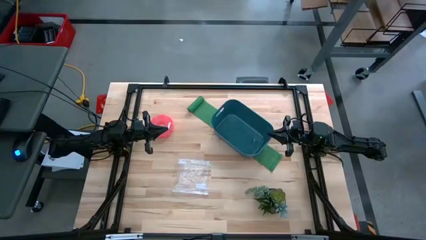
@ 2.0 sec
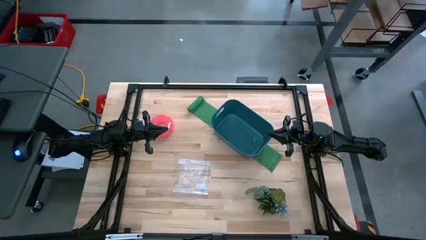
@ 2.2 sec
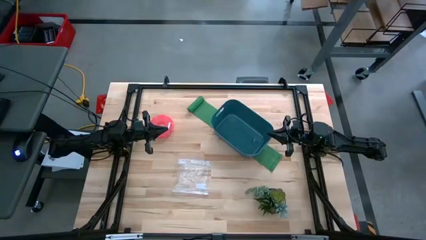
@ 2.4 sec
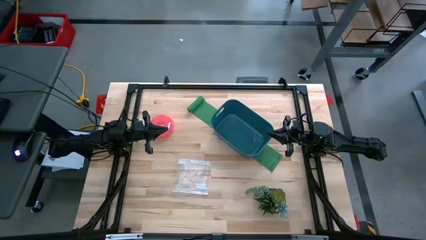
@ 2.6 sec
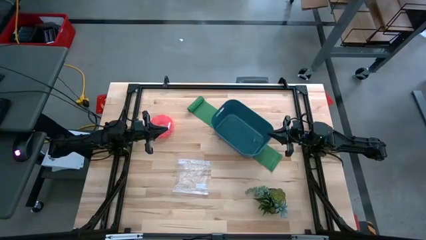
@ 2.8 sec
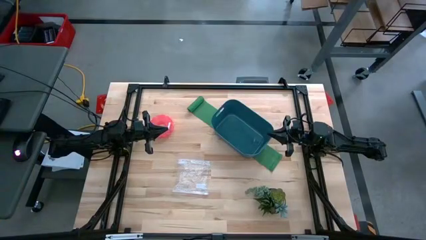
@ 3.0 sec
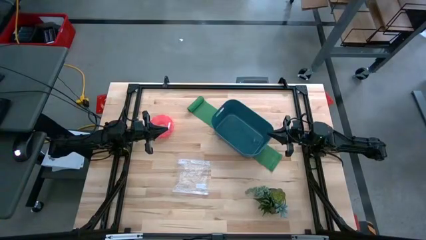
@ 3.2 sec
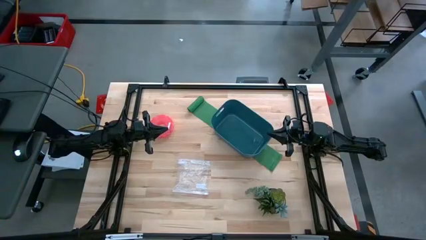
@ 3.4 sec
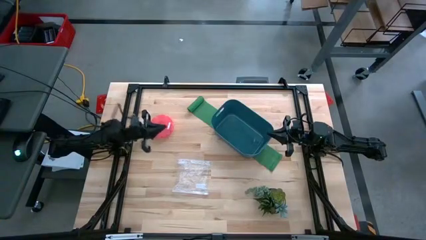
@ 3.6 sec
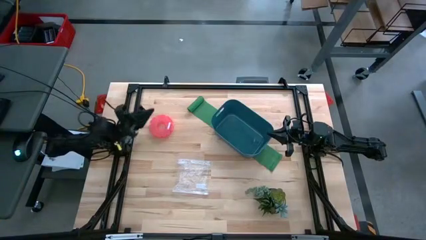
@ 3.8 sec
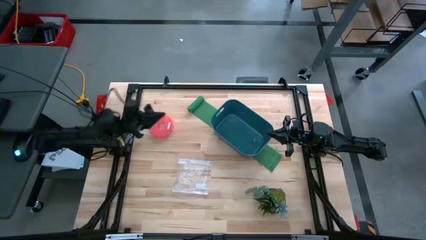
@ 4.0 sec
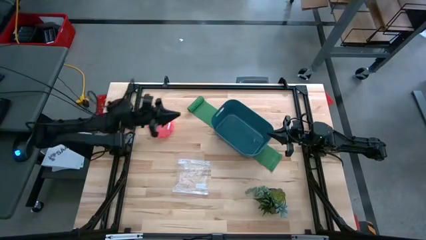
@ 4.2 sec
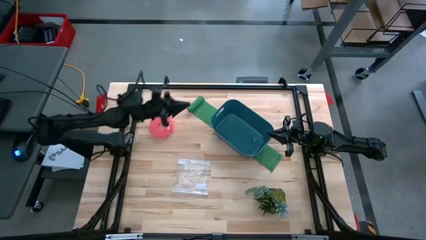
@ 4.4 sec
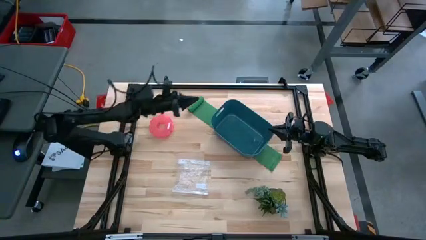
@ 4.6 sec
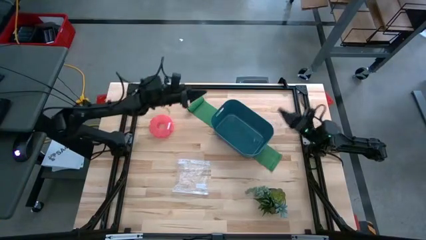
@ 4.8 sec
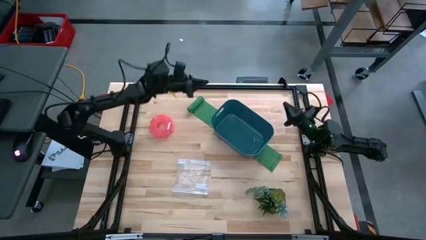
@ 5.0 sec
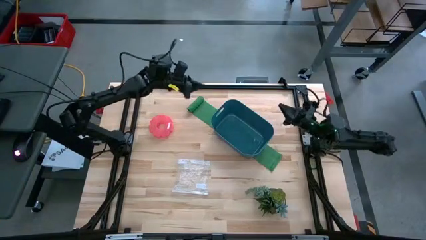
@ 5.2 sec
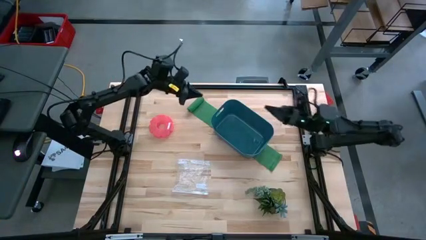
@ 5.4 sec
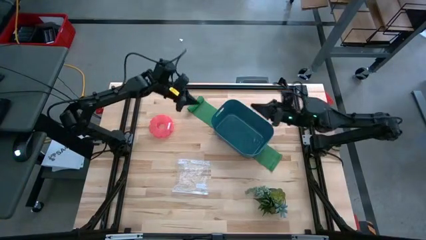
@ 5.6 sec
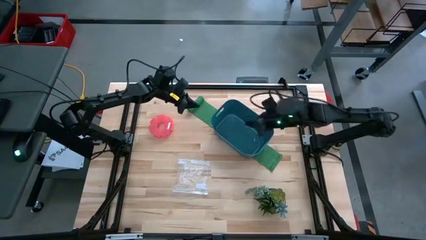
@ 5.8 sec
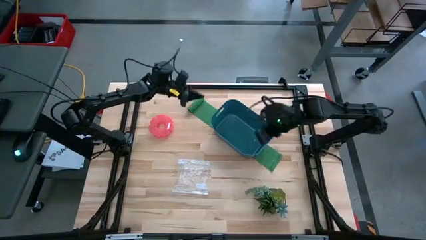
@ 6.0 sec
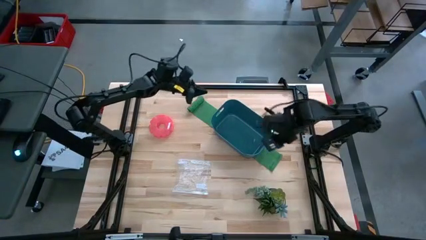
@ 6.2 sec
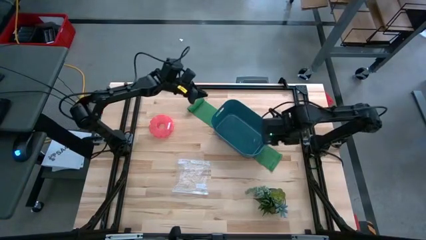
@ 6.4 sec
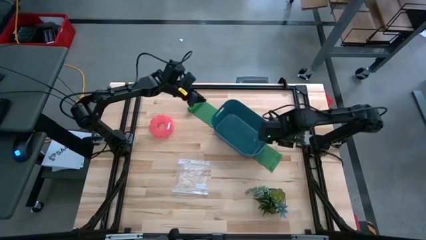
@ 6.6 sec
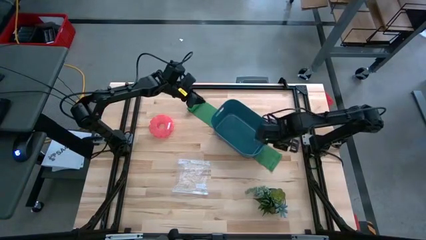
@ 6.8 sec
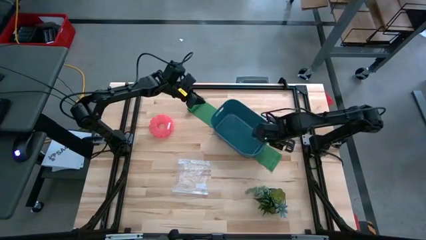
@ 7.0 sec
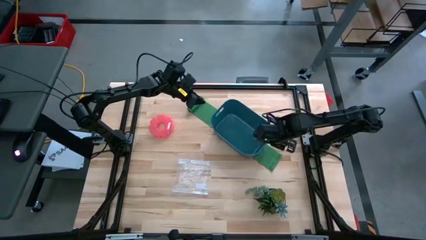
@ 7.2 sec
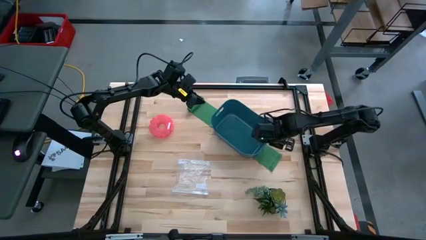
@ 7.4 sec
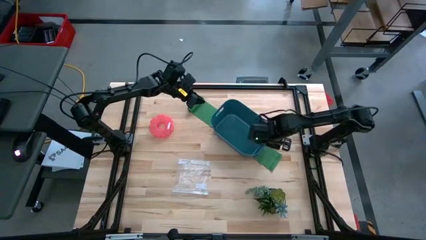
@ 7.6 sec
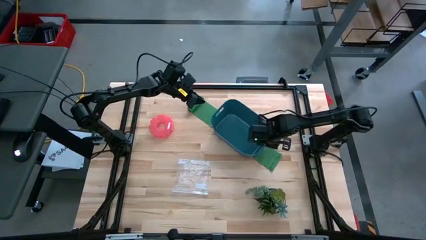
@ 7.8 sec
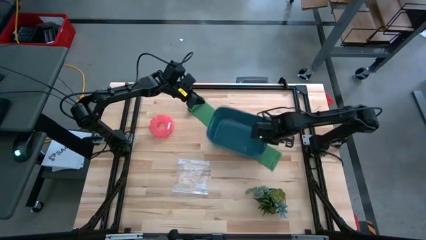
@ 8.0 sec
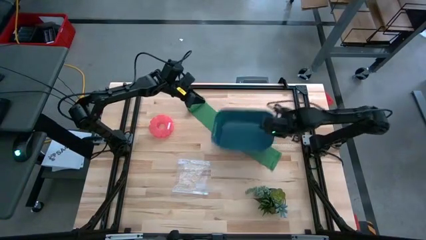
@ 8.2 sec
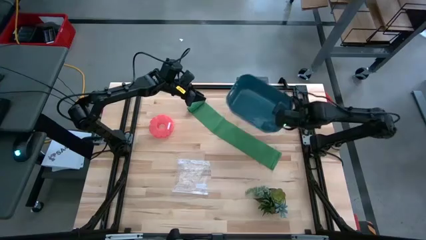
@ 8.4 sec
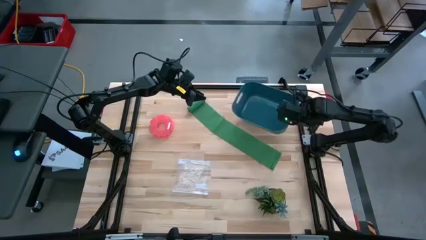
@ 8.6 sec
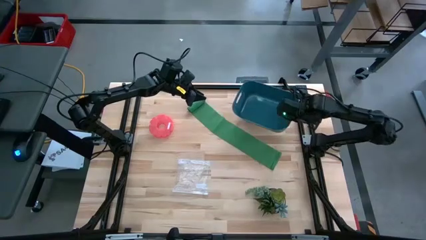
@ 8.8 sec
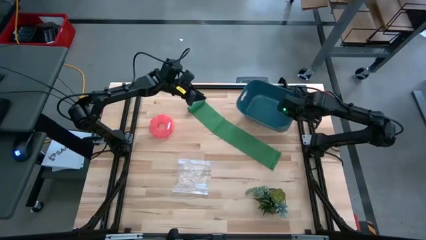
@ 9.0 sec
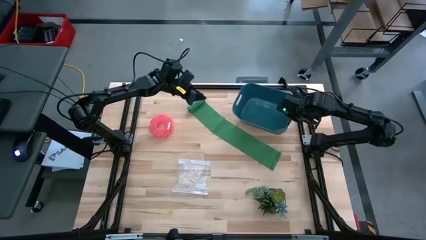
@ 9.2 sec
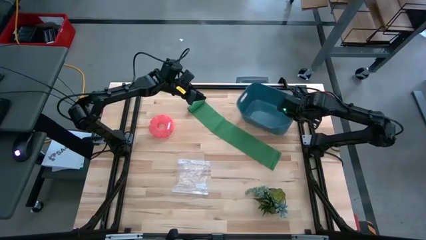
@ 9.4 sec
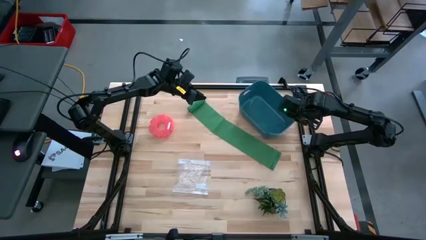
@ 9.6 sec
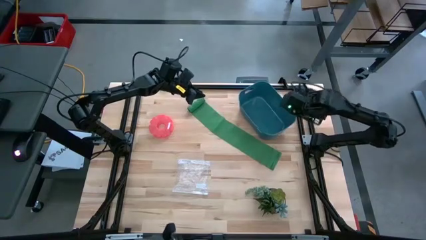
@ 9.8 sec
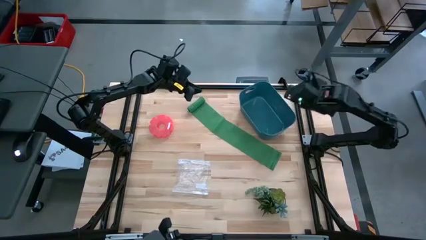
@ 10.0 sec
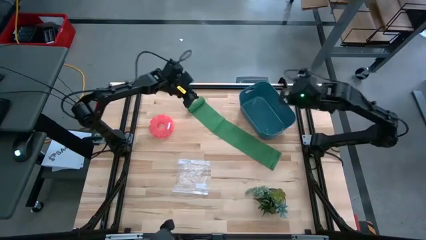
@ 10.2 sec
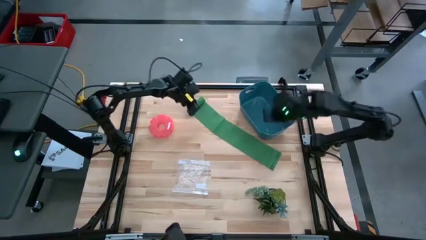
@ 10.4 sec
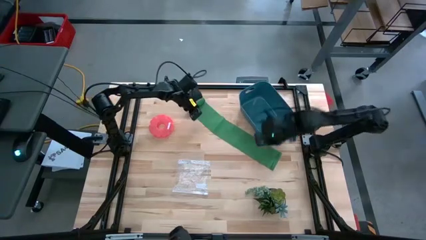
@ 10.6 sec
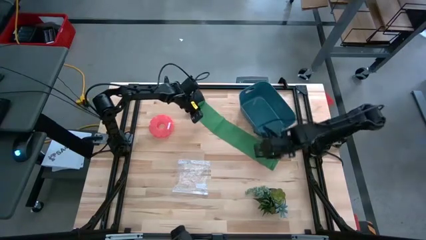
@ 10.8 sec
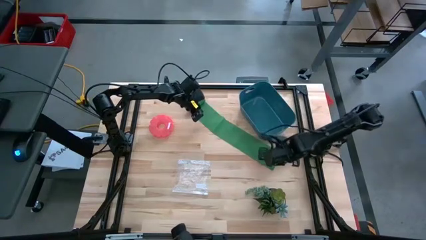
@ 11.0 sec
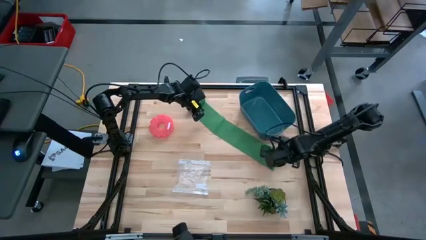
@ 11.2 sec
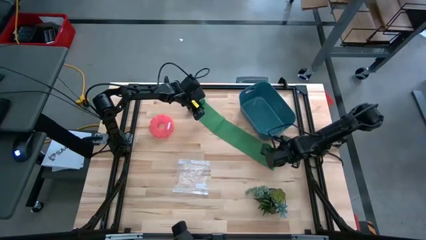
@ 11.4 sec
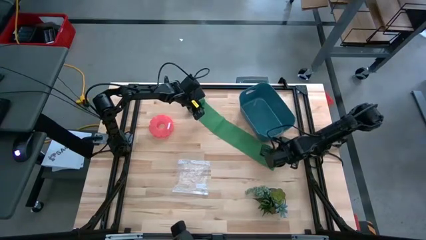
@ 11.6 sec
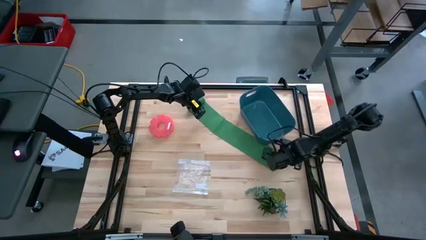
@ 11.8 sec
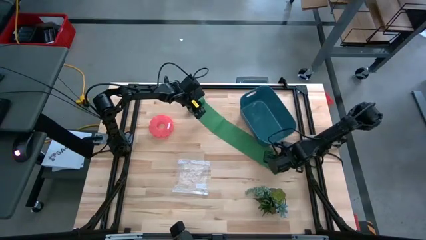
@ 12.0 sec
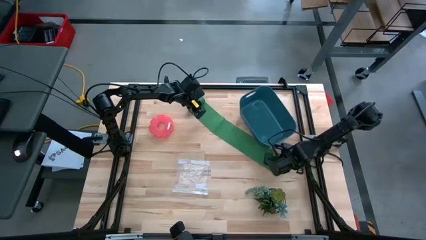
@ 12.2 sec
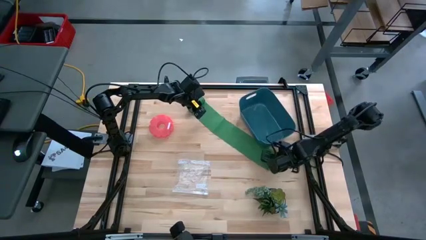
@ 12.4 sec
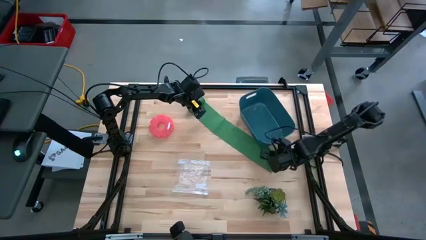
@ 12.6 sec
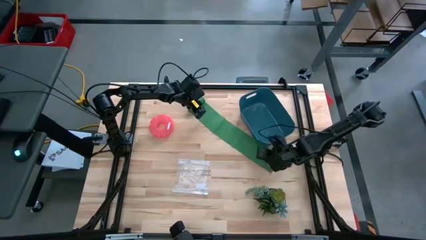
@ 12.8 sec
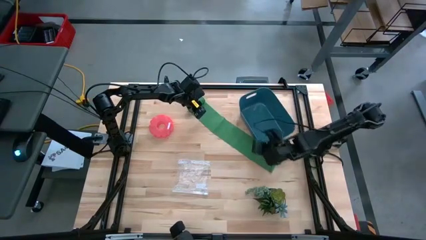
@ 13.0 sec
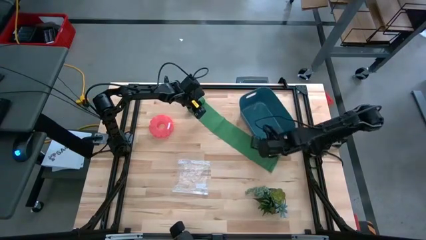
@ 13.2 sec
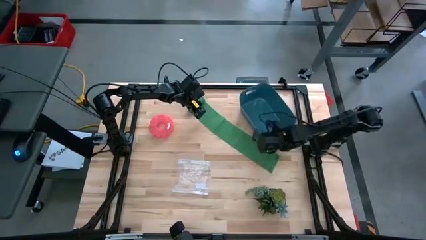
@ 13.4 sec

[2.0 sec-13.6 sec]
Task: Roll bandage
Move the blue bin to the top right of the table

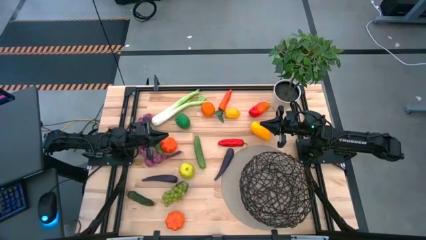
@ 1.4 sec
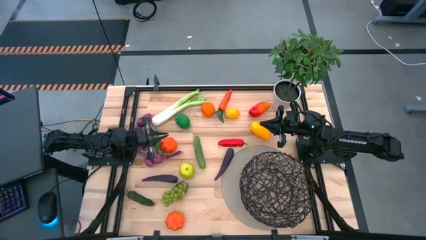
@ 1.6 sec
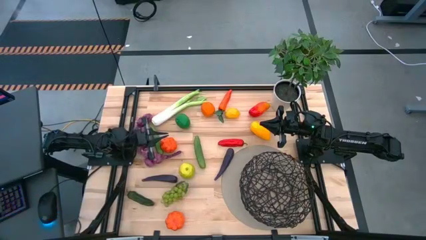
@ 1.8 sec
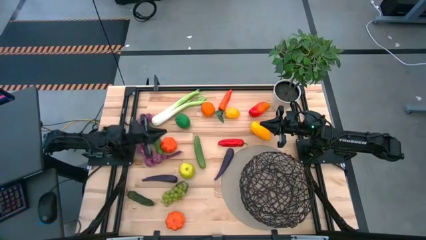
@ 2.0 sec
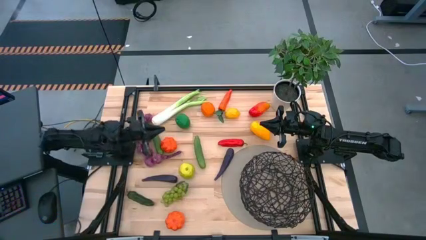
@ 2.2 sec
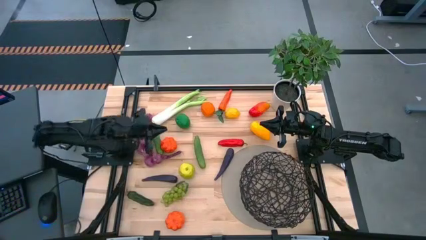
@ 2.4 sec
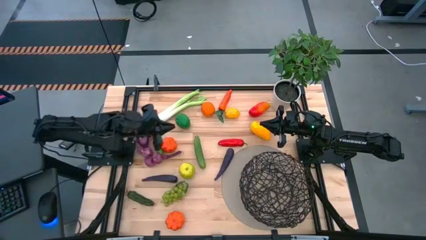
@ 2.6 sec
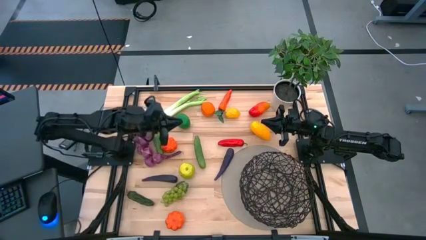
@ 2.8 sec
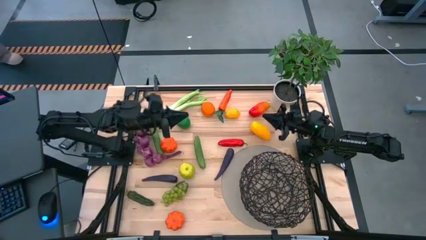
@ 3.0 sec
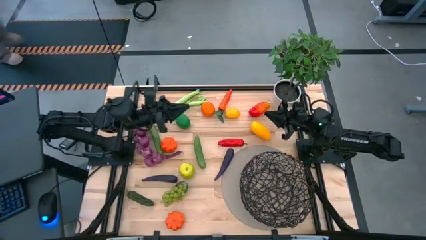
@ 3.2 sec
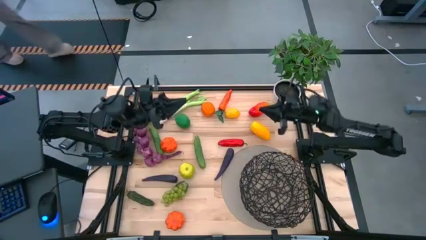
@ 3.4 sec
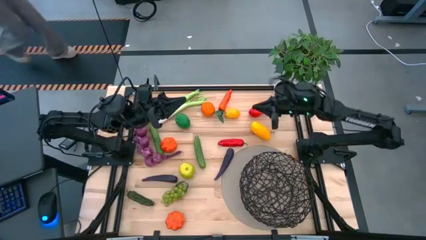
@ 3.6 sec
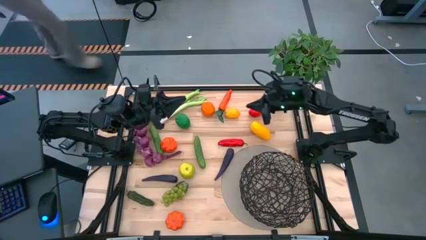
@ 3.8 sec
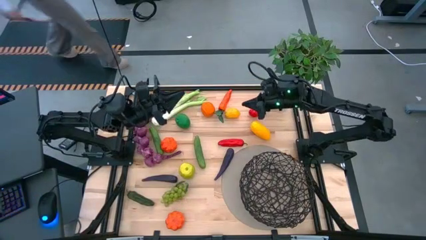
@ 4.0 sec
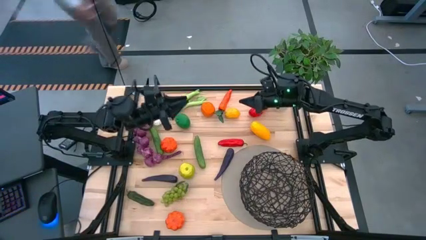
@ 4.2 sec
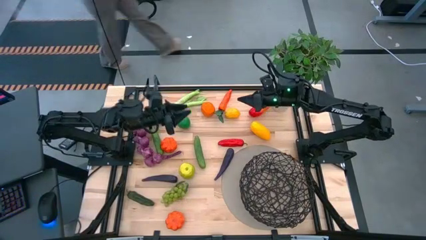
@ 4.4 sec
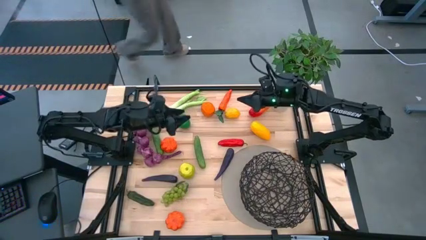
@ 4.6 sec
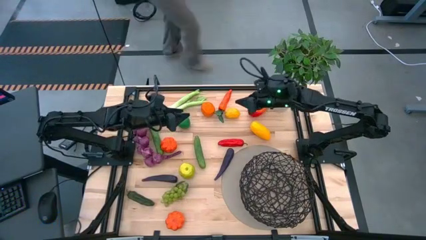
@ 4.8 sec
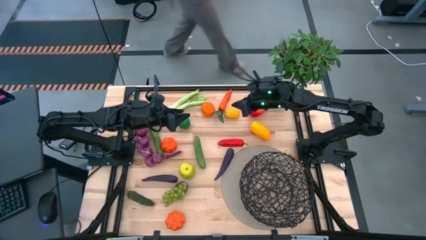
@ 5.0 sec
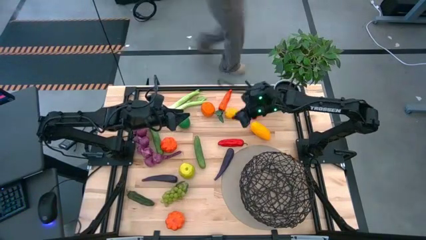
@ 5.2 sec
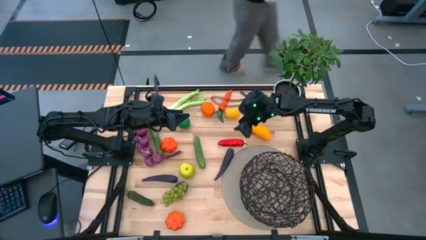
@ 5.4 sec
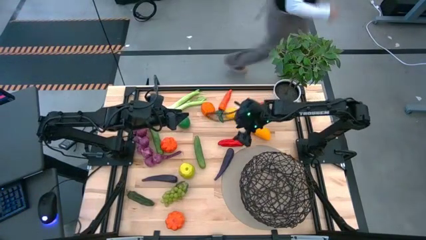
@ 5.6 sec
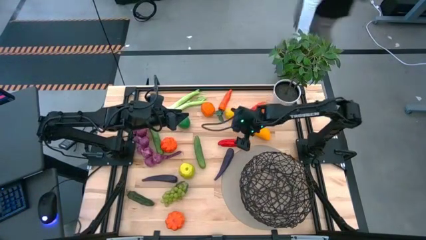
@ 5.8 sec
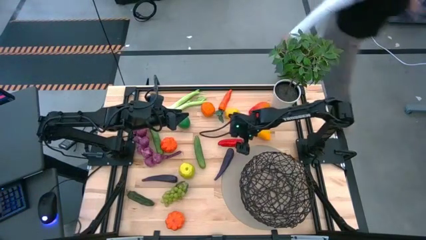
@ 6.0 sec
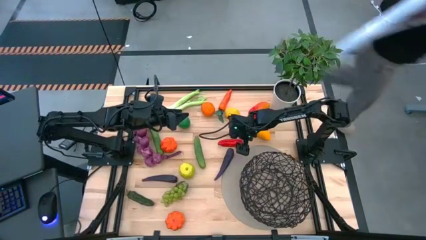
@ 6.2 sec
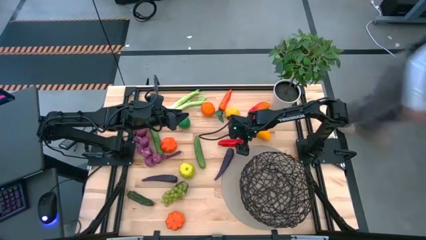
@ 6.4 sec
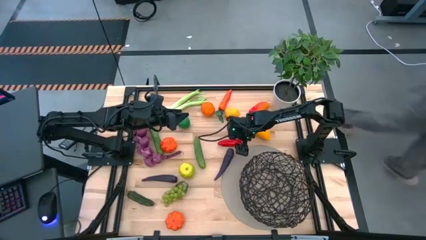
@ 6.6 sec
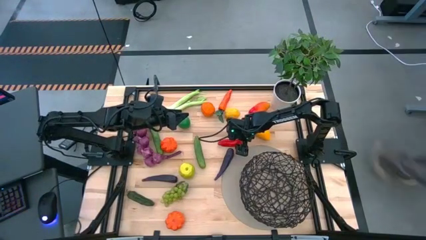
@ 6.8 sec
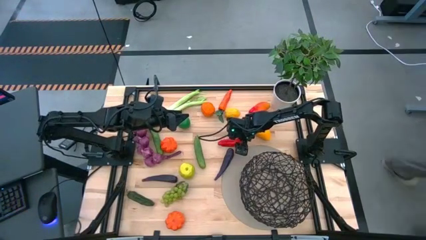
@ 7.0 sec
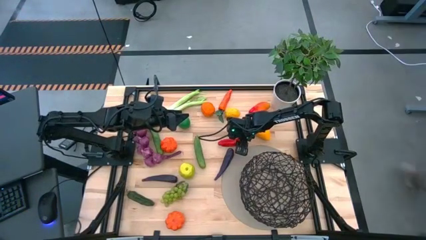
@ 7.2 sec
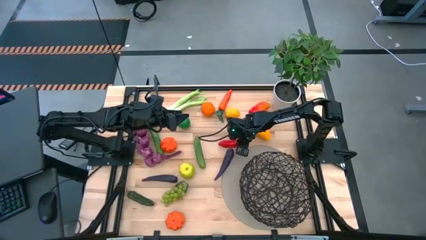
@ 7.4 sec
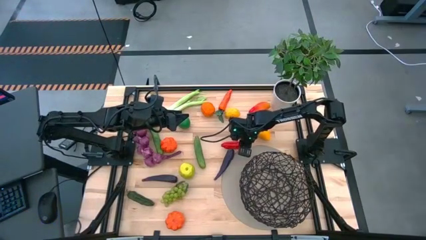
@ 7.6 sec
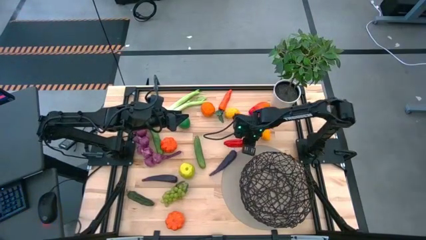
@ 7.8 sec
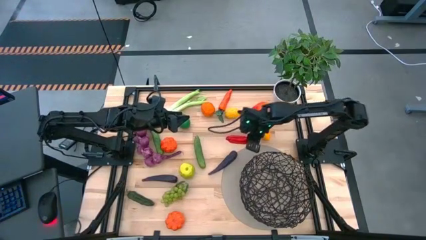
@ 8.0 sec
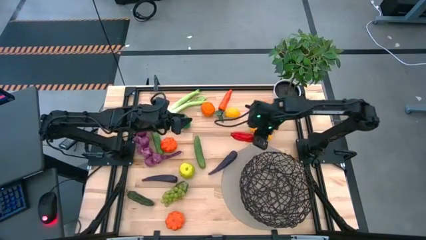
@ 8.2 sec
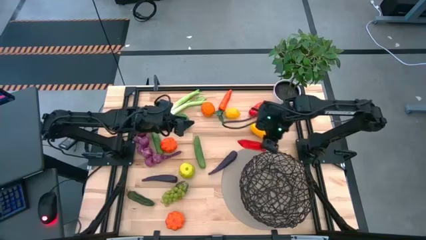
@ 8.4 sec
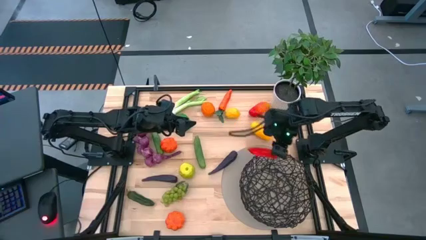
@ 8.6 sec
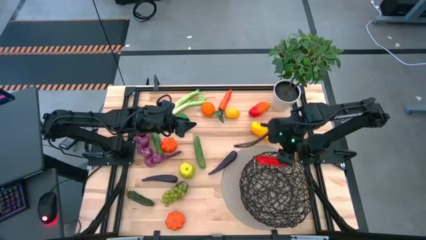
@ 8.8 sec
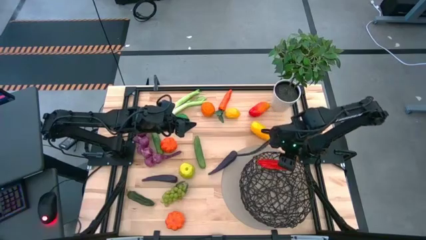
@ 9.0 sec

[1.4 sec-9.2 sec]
Task: Build produce basket
Put the red chili pepper into the black basket
